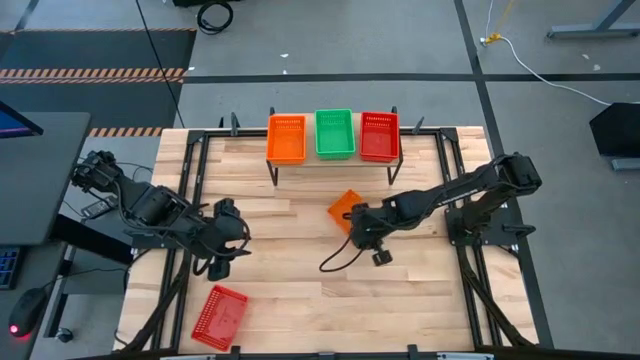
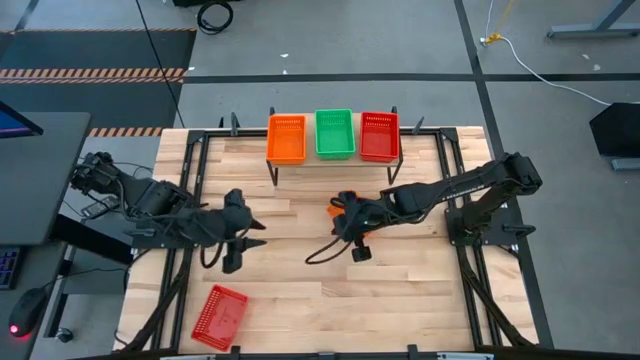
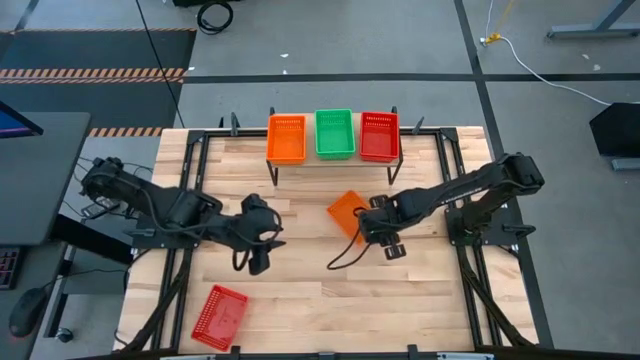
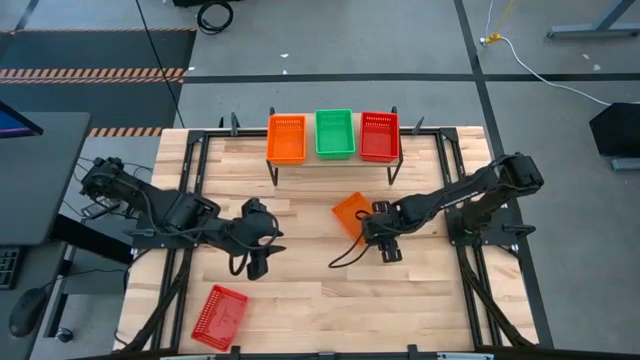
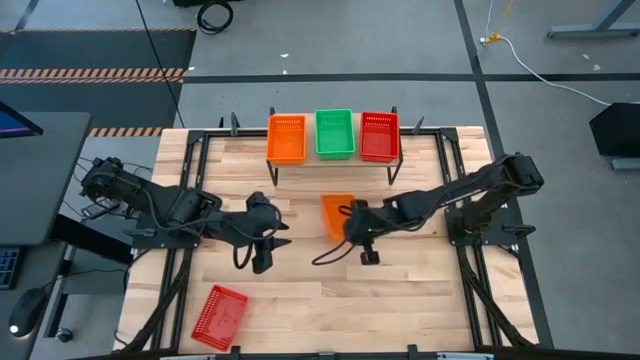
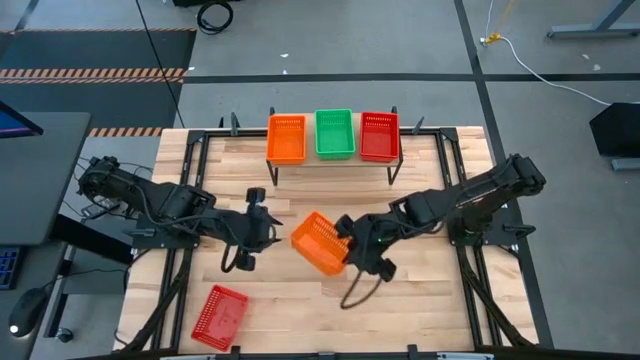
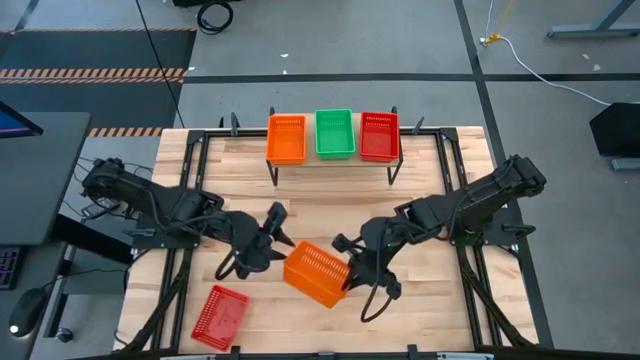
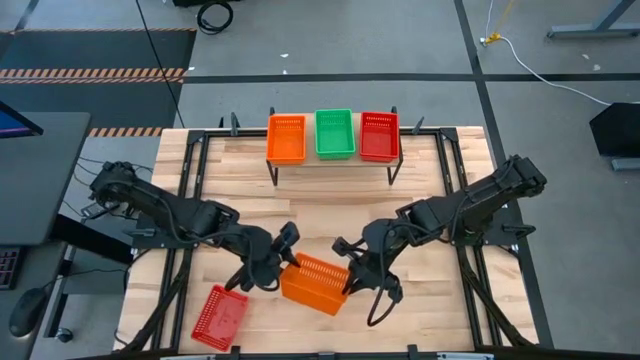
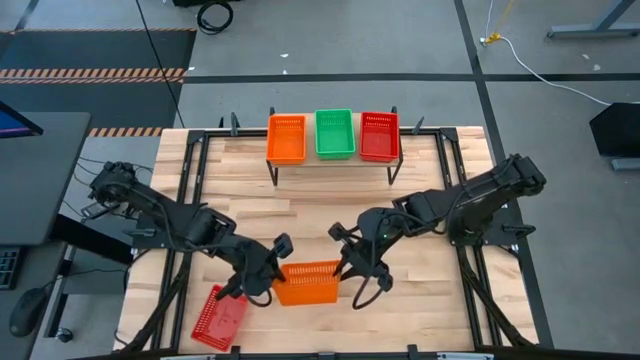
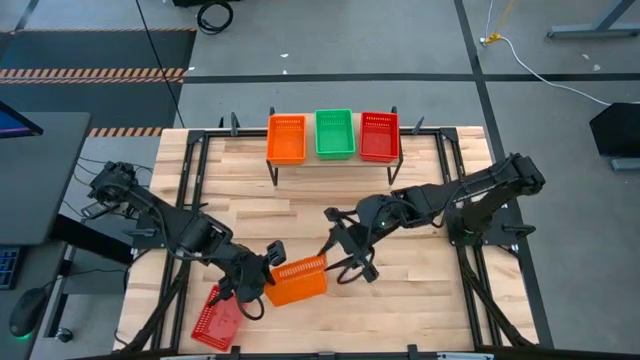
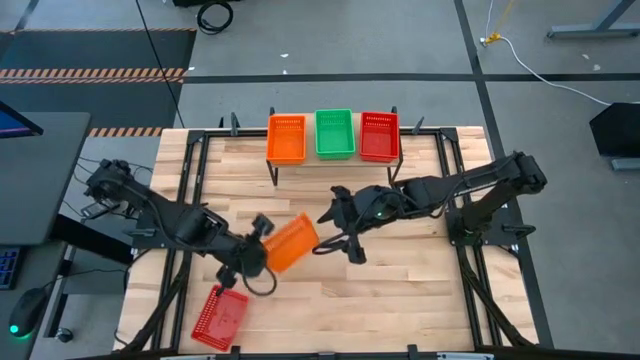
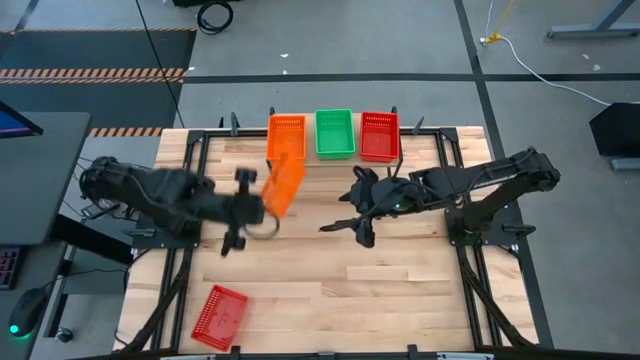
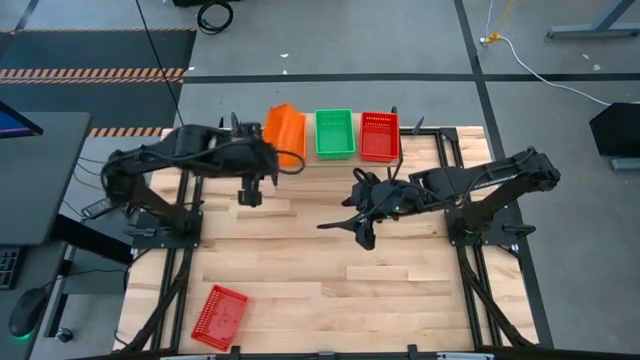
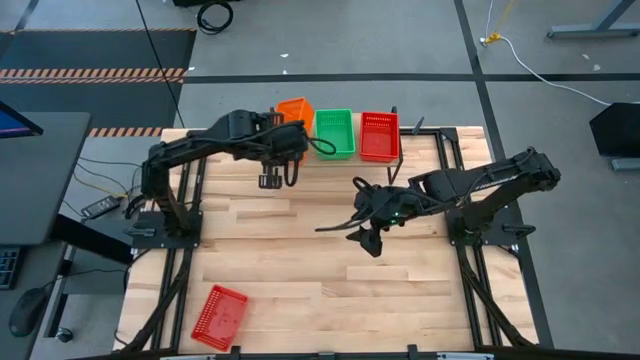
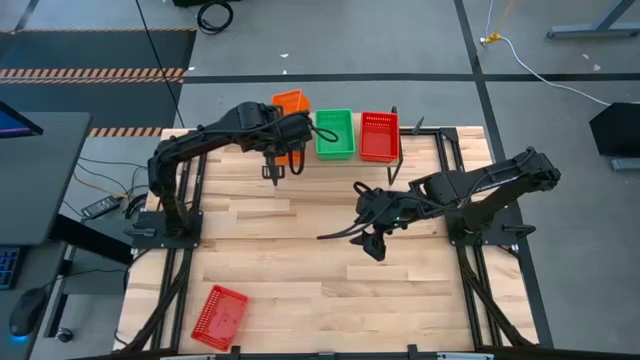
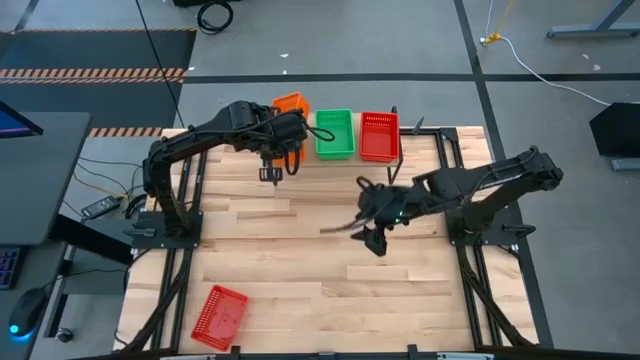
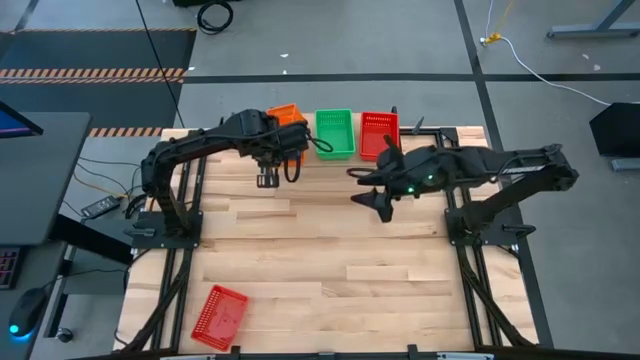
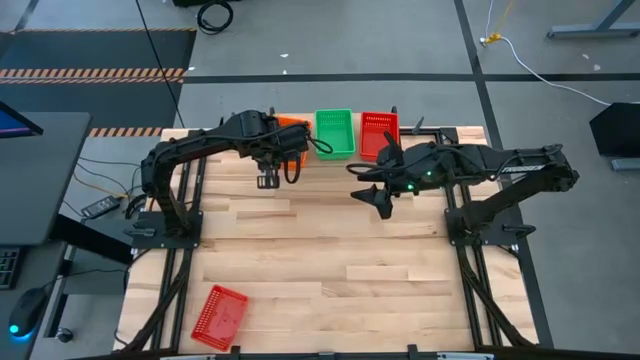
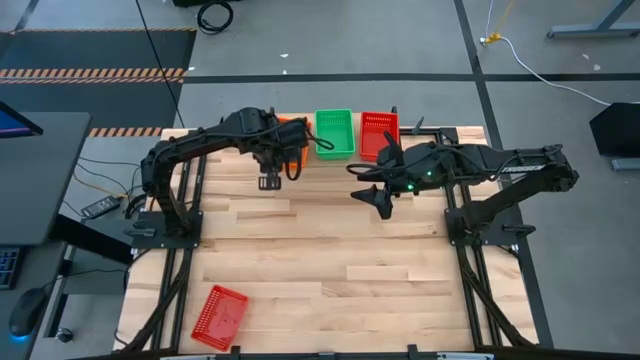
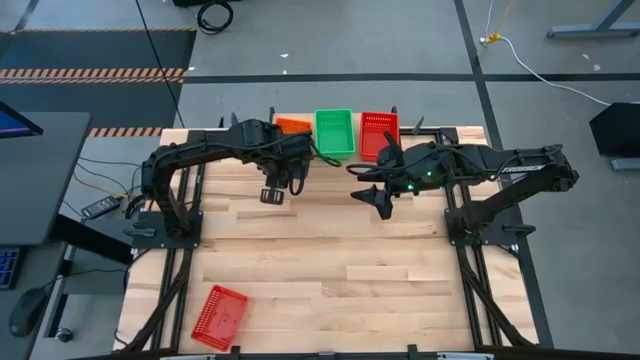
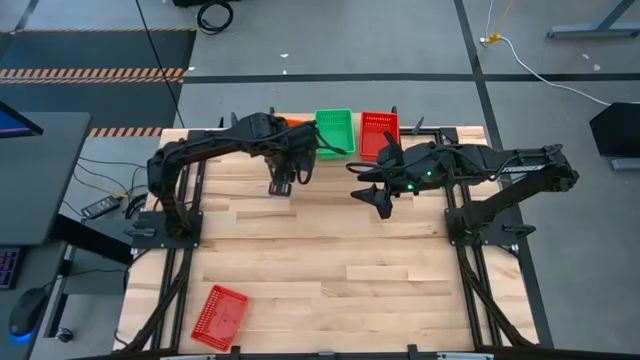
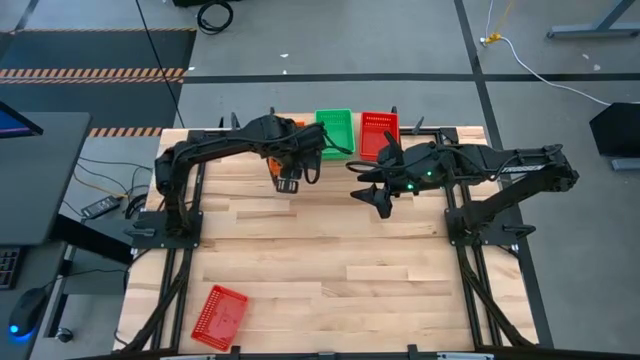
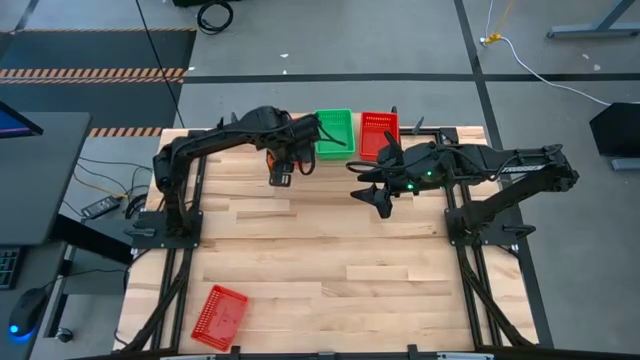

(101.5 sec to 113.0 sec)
Task: Stack baskets on shelf by color
Stack the orange bin on the orange bins on the shelf

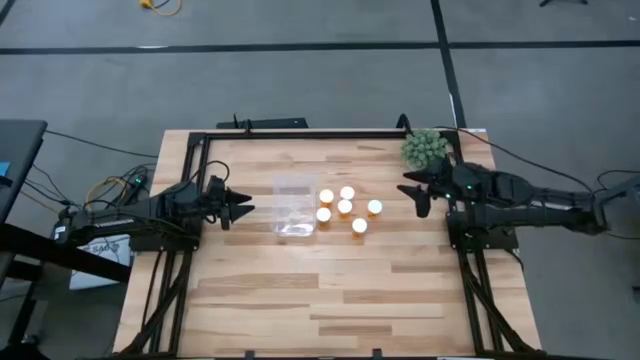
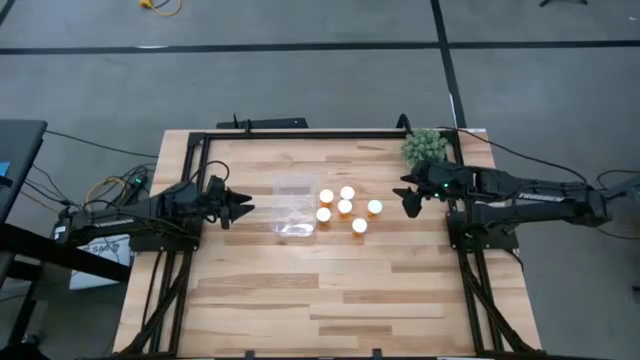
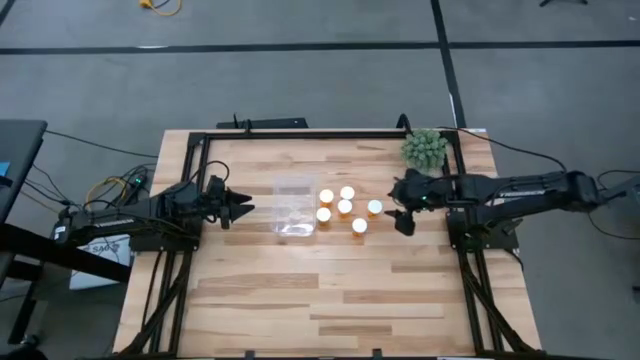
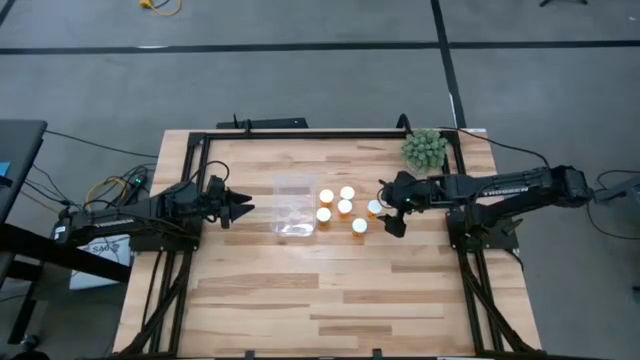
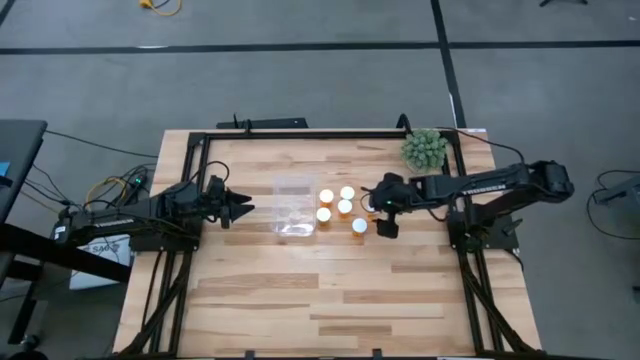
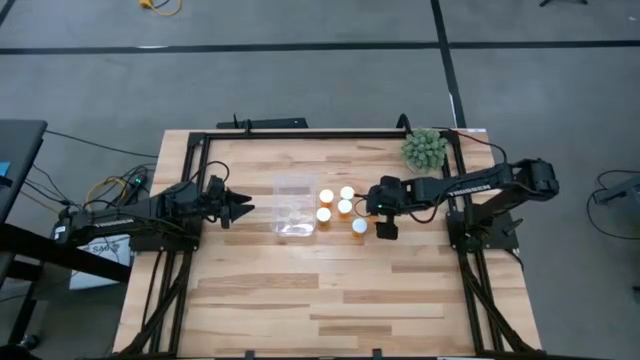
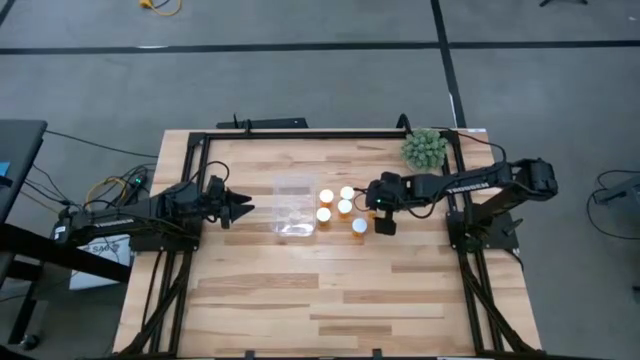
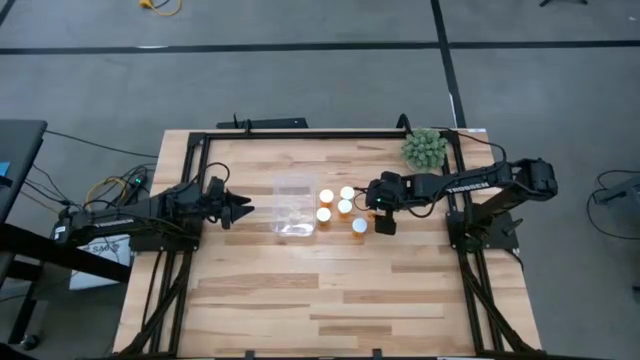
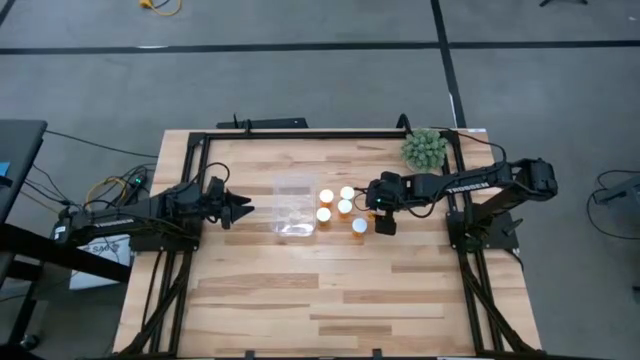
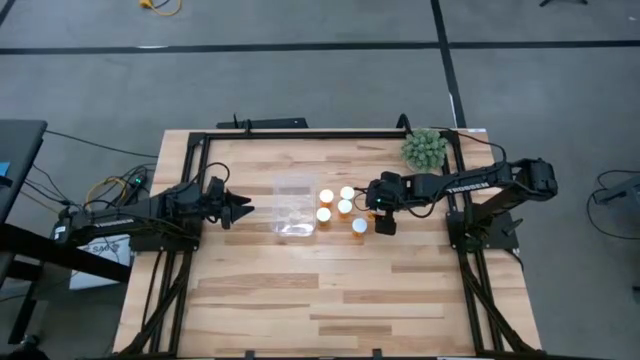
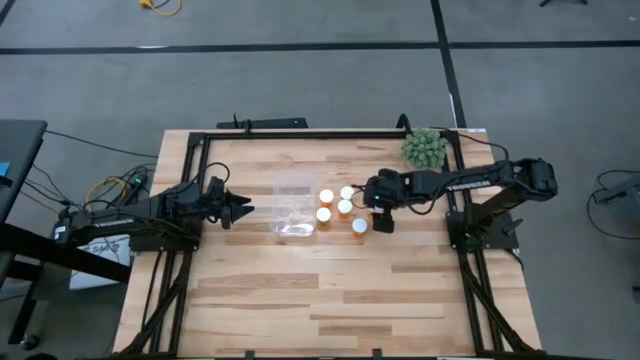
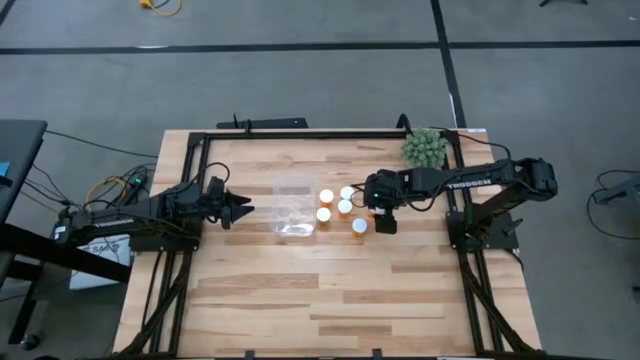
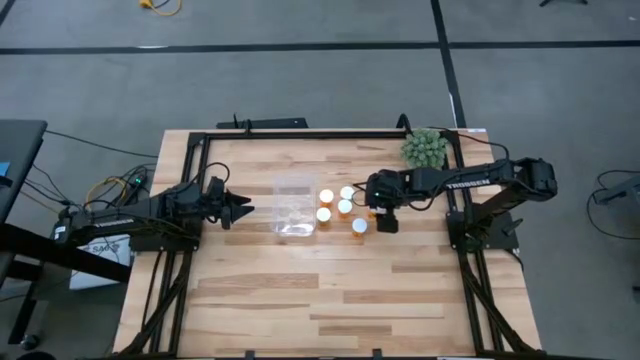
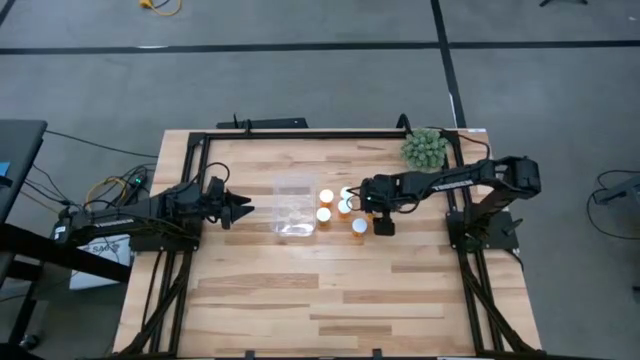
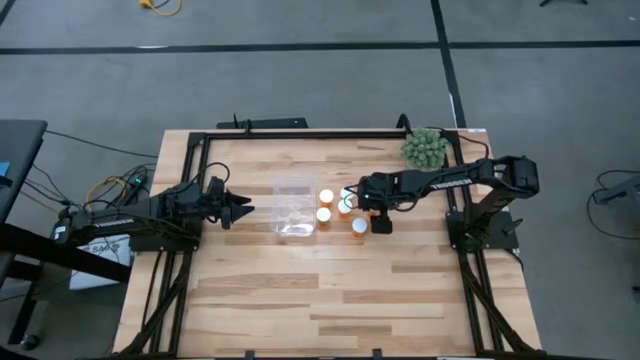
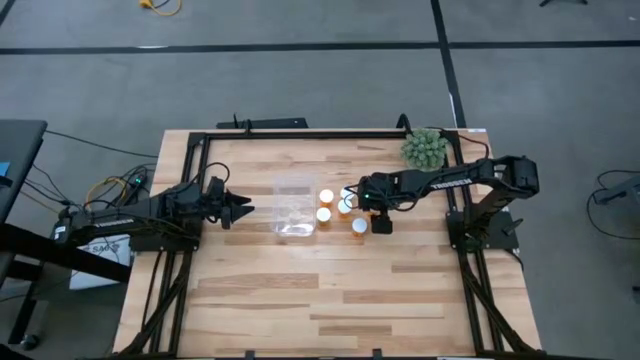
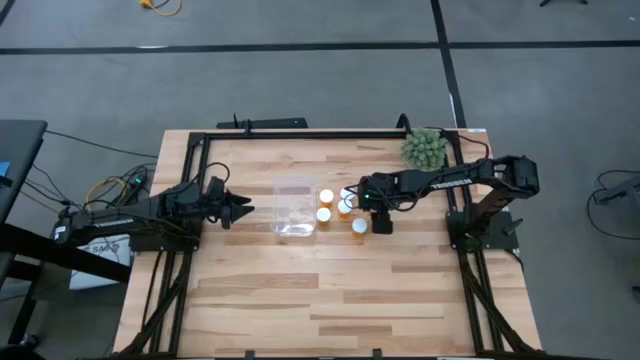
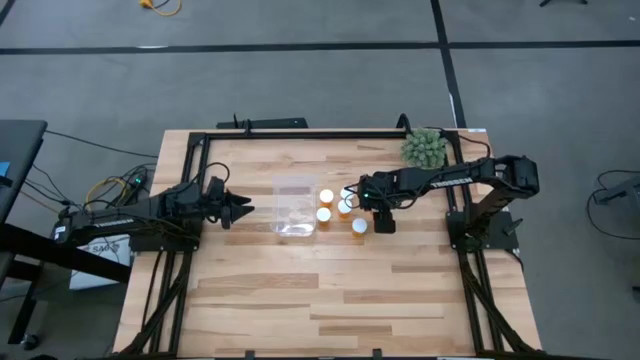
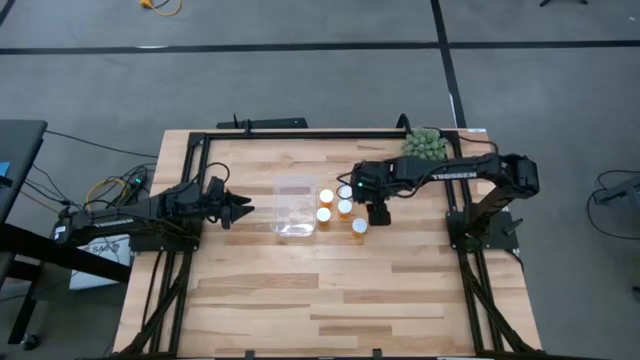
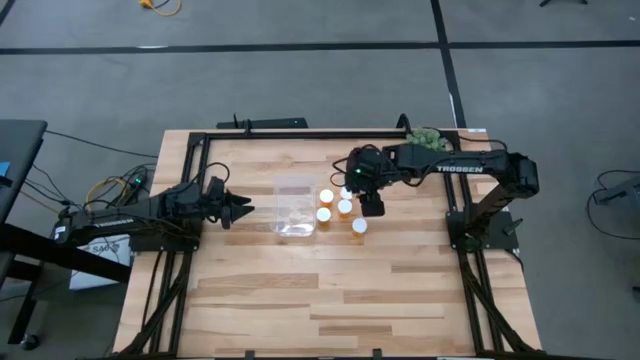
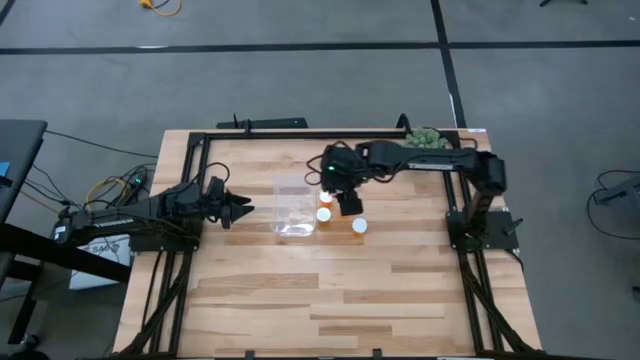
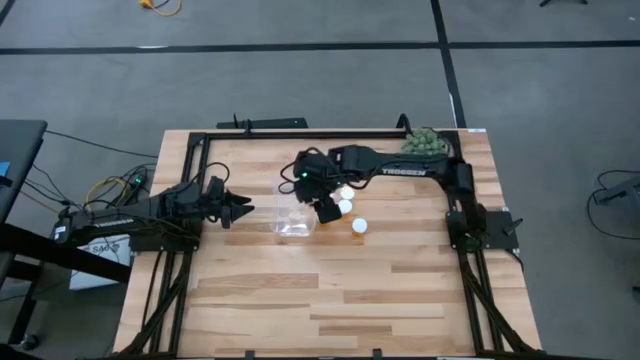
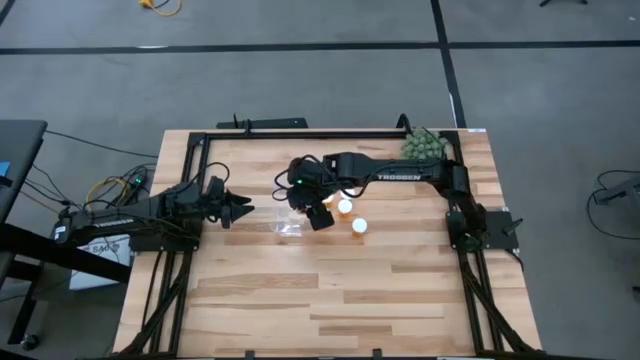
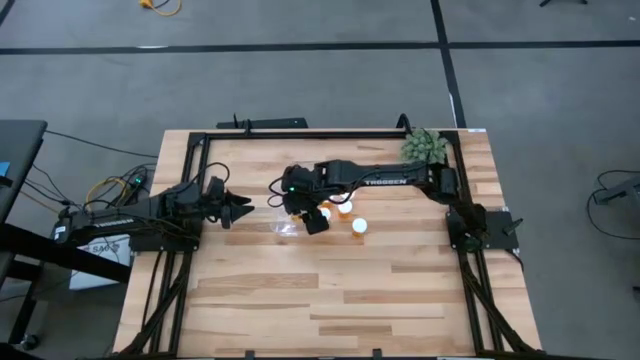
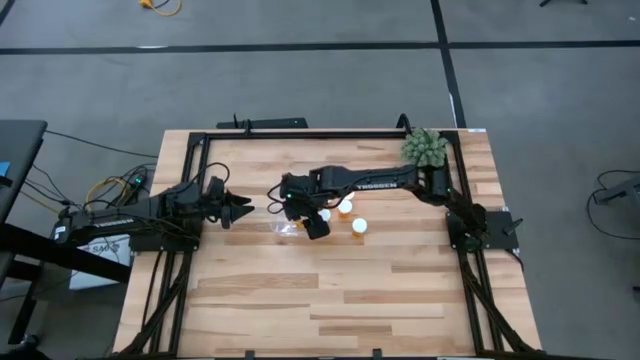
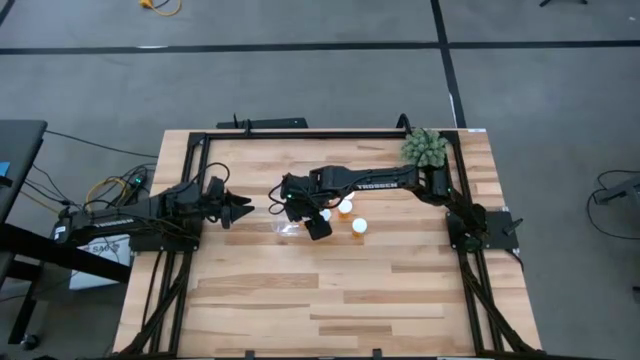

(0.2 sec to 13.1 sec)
Task: Pick and place pill bottles into a basket
Put the orange pill bottle into the transparent container
